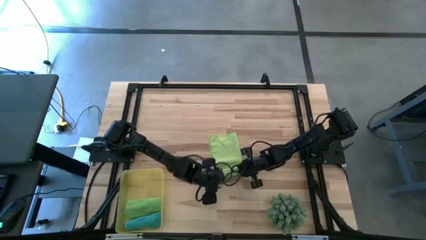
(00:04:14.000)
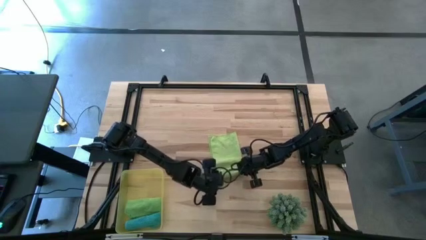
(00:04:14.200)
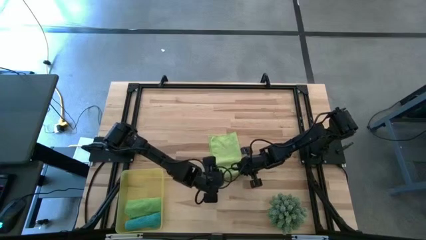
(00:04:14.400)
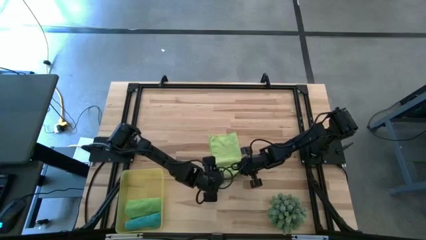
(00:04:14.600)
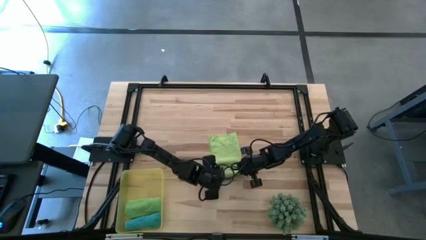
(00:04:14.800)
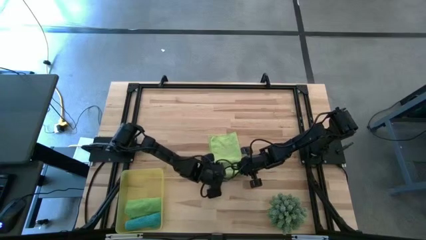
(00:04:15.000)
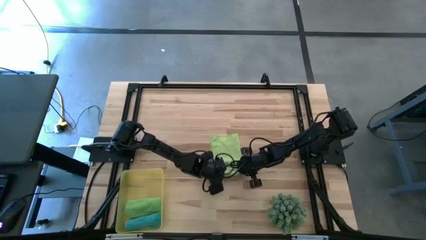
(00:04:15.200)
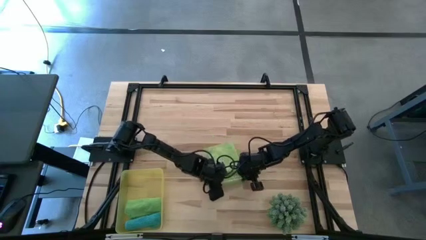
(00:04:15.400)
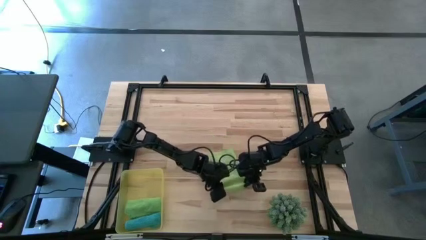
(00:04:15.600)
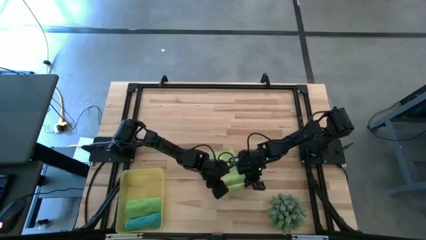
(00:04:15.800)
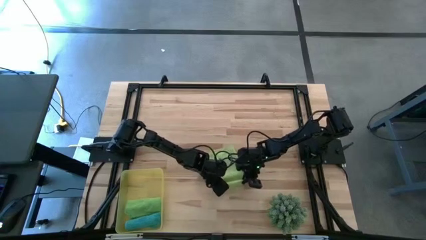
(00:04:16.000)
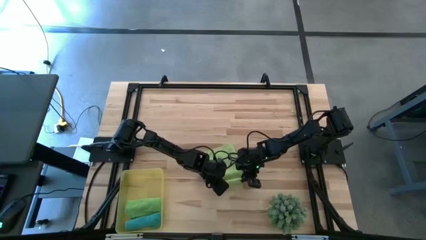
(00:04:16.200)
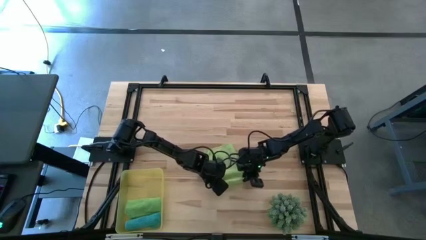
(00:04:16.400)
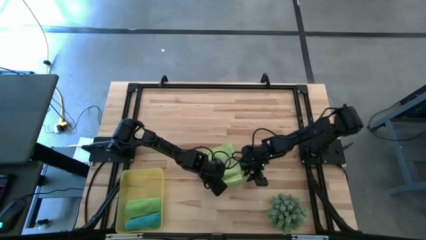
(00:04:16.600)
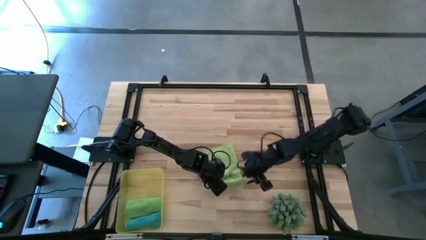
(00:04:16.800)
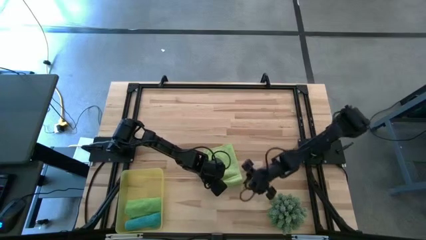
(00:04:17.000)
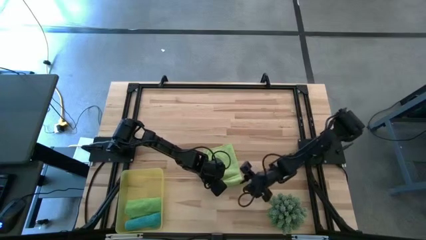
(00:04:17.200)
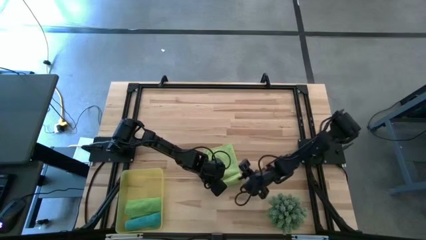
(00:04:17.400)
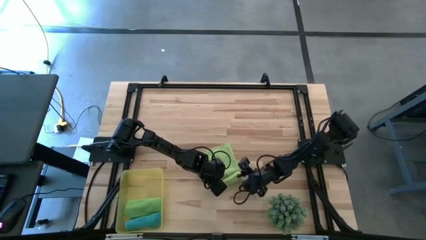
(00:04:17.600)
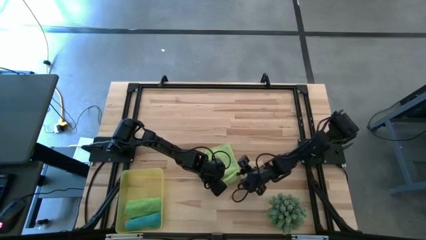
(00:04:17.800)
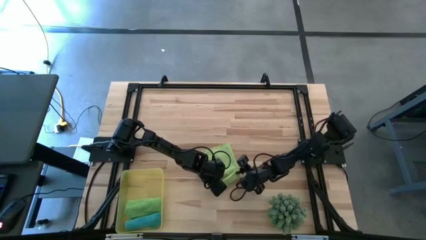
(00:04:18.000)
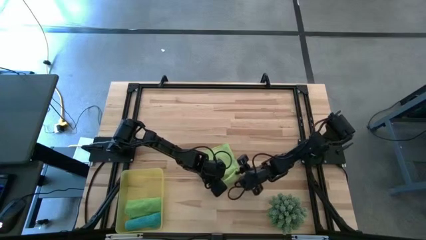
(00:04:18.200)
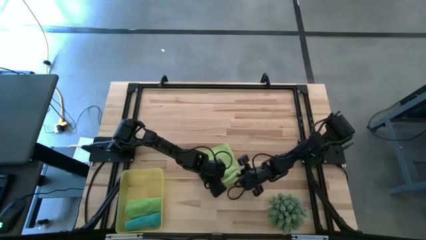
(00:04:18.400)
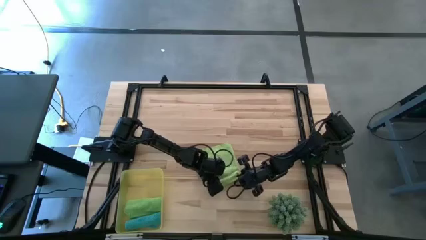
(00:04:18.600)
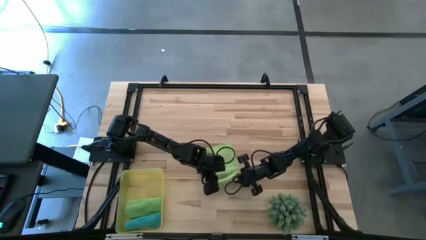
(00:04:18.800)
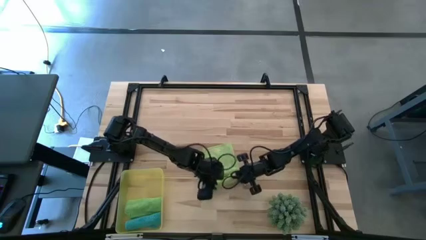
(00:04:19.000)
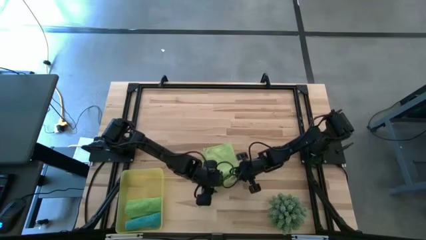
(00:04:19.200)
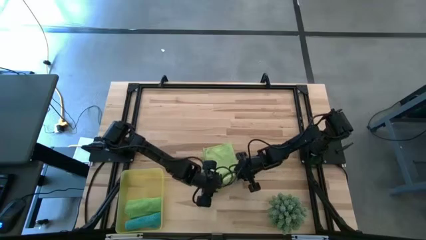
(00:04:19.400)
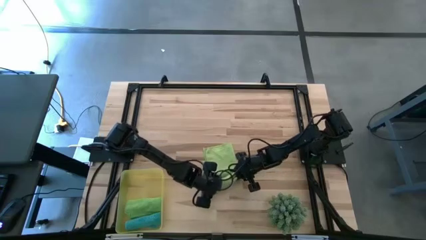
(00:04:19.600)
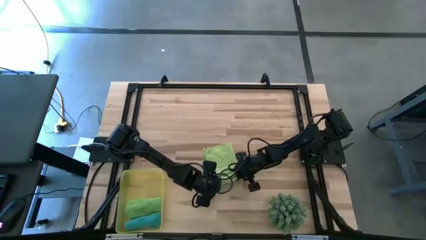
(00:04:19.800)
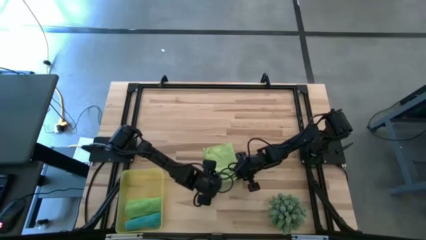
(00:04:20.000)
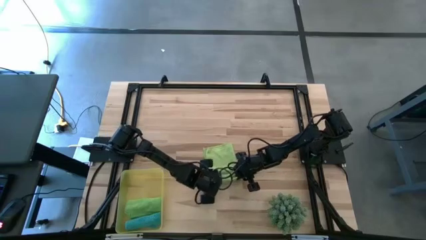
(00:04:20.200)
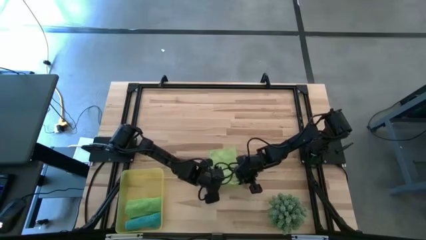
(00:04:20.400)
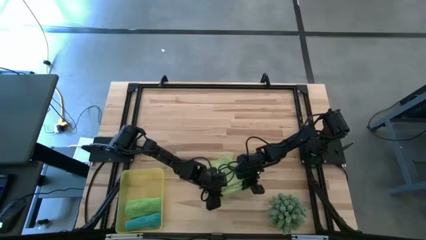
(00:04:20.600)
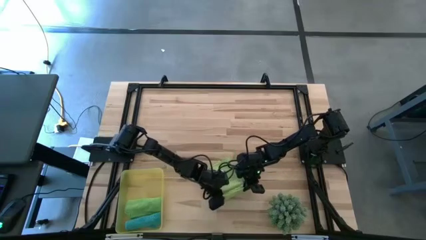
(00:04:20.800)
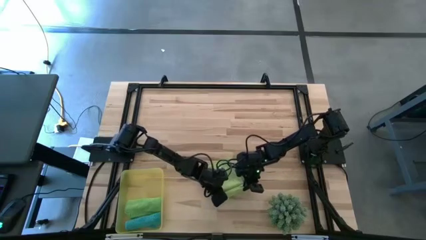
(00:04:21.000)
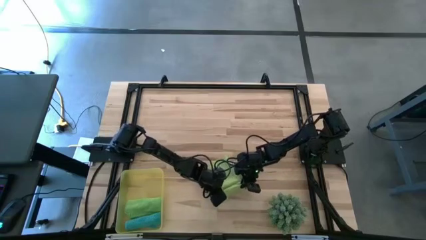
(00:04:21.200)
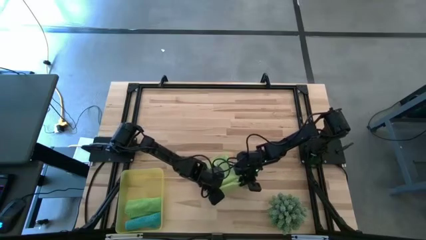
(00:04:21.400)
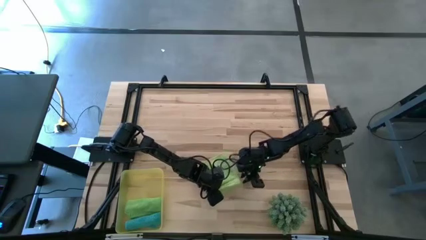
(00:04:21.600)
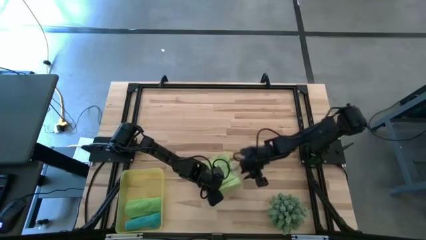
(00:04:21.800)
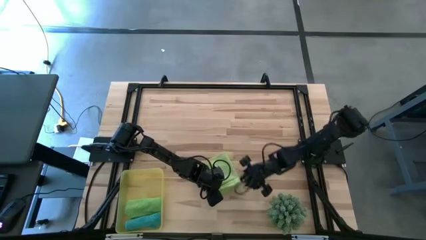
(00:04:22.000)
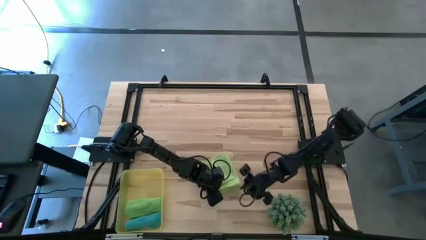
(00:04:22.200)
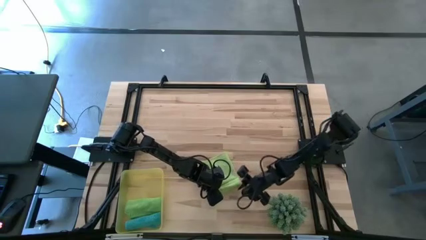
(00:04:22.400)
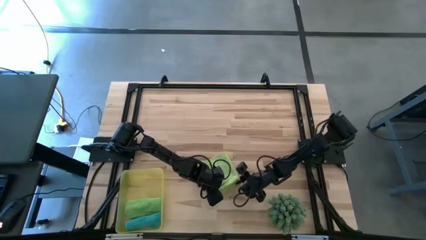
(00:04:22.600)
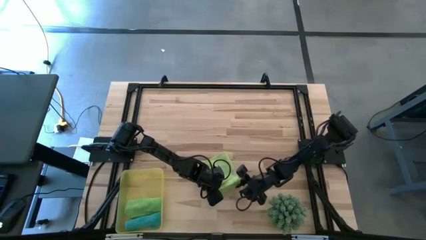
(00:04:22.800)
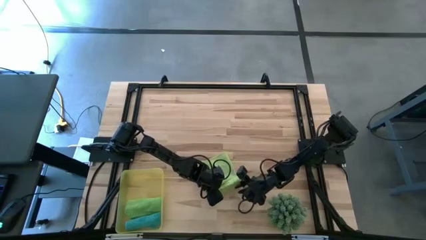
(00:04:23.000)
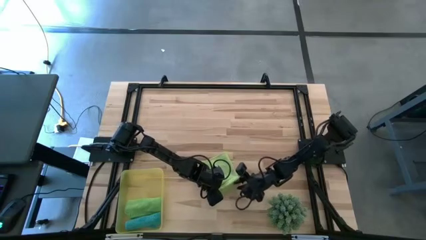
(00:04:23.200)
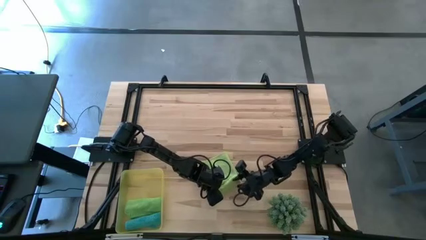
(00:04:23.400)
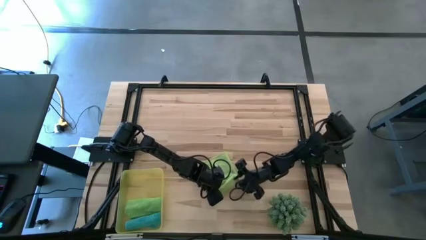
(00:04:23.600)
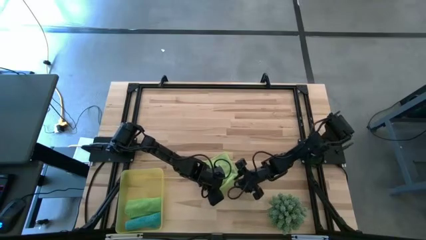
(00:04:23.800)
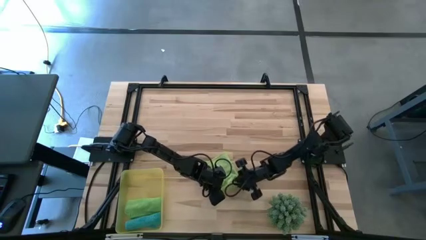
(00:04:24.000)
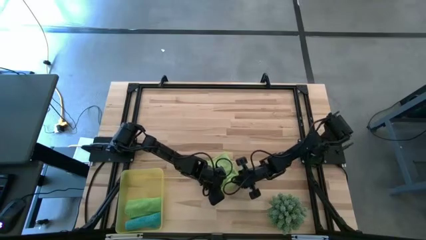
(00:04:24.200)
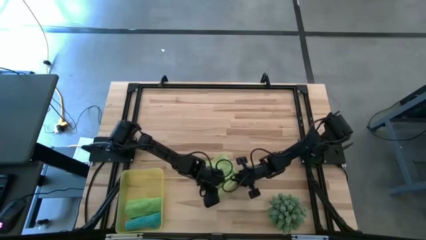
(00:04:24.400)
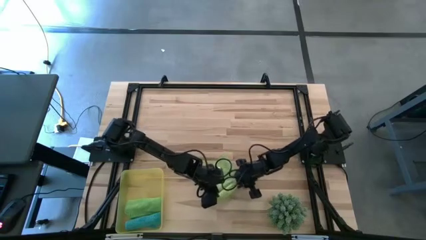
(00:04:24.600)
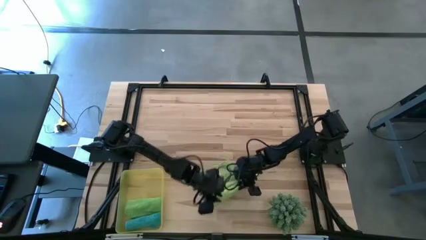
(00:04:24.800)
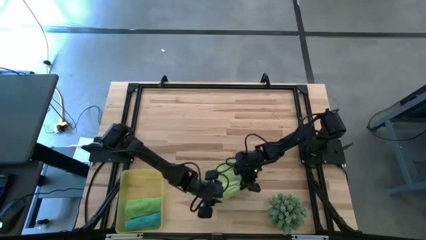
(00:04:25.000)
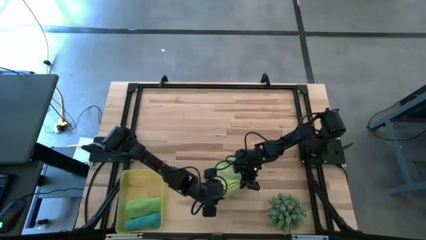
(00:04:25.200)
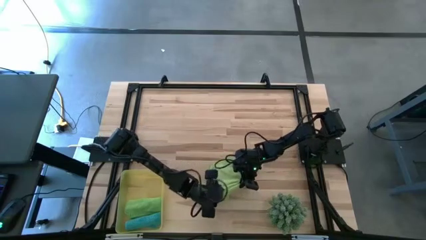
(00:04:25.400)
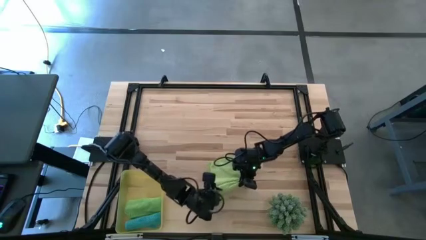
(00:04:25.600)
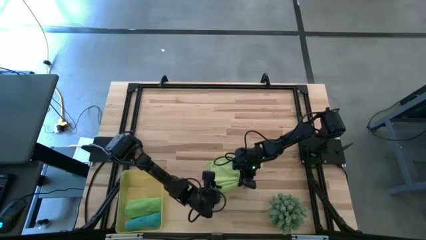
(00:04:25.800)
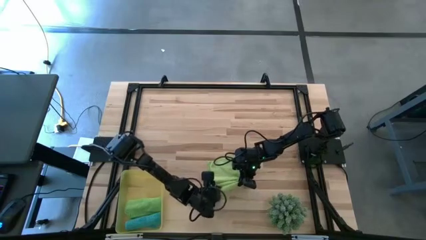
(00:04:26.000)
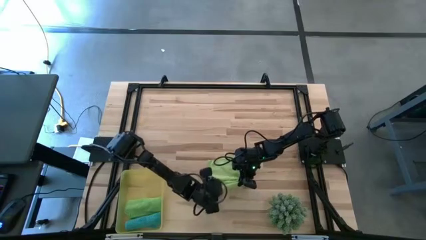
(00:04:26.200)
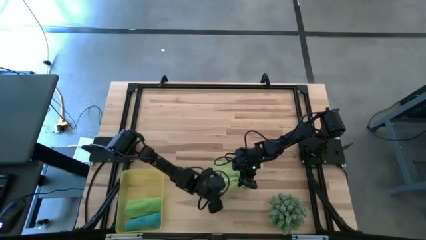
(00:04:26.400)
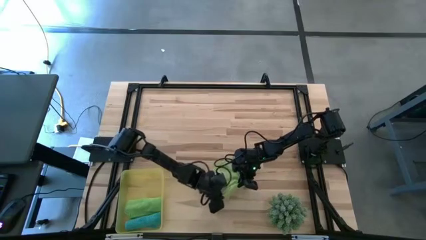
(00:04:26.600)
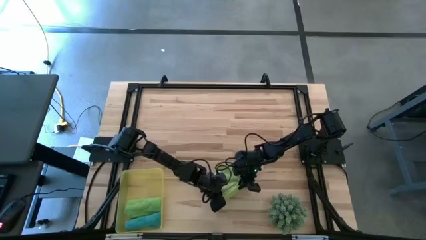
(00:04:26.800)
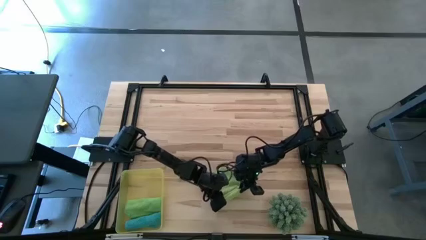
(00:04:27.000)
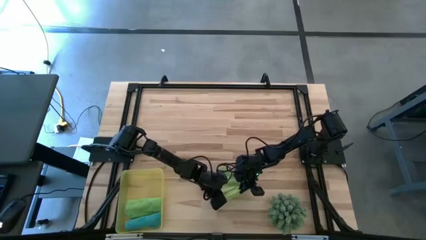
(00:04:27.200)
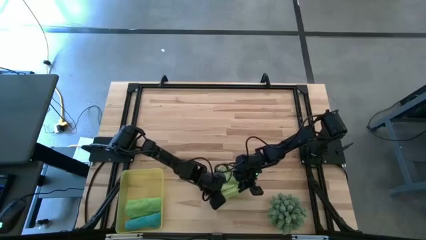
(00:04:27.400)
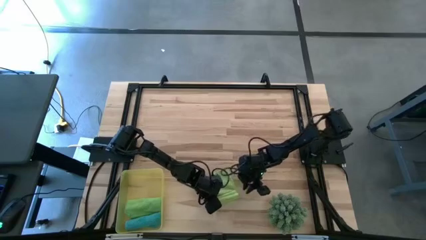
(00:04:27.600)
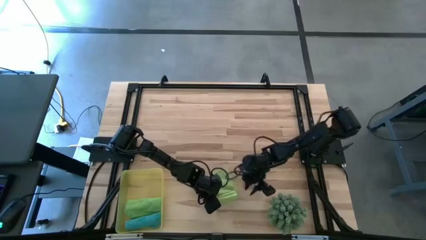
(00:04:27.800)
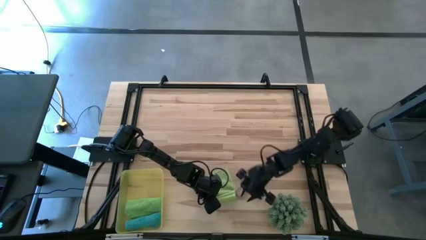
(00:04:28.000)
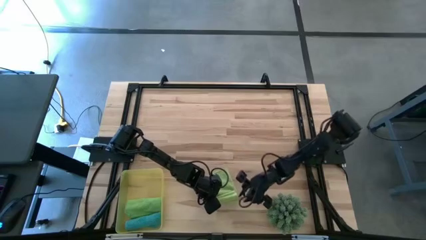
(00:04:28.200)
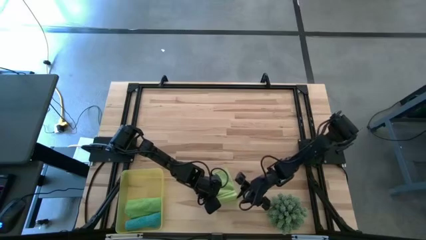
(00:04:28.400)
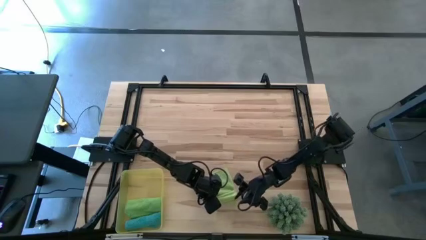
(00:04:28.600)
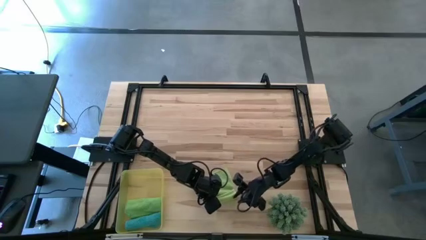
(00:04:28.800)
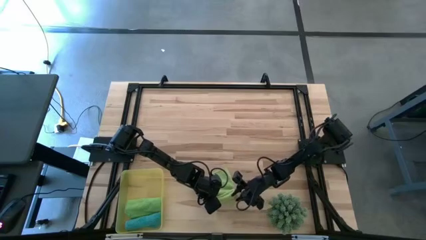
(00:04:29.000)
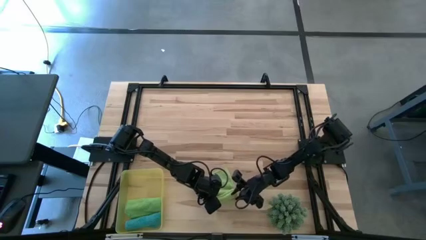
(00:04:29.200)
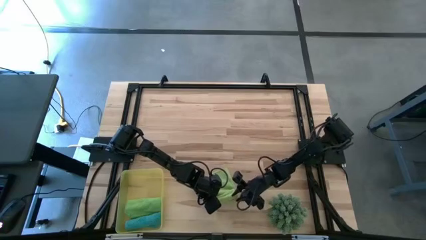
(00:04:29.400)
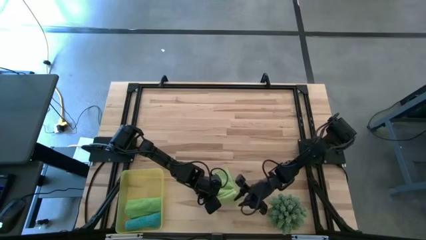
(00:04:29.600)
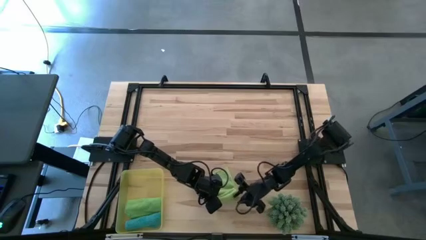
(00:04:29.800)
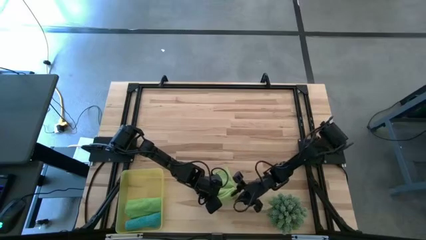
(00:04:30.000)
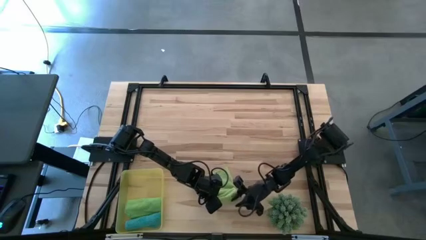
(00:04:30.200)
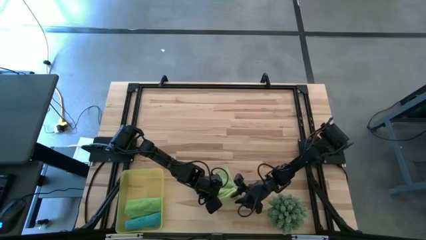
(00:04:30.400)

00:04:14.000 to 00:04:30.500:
Task: Roll microfiber towels into tight, uniform cylinder then place into a basket
Roll the light green microfiber towel
